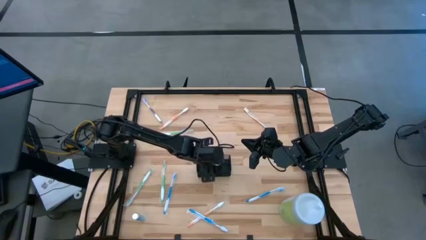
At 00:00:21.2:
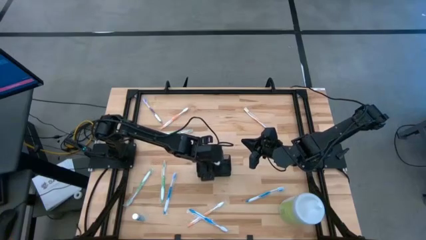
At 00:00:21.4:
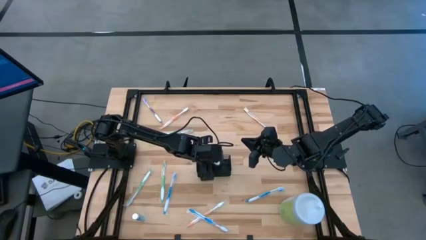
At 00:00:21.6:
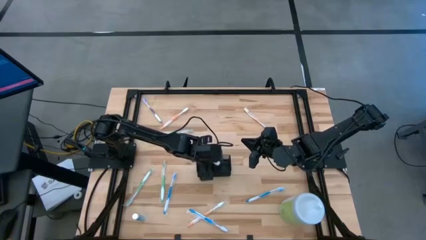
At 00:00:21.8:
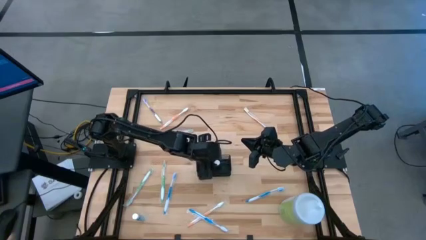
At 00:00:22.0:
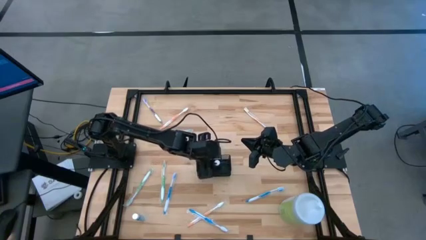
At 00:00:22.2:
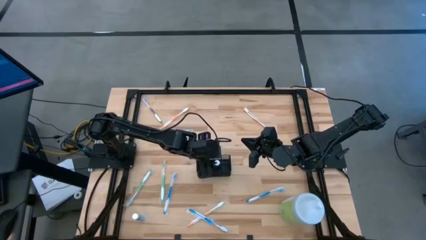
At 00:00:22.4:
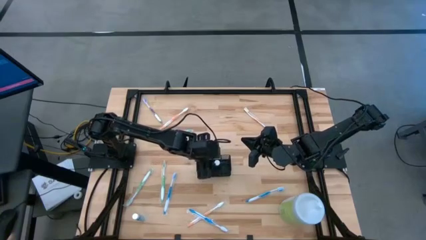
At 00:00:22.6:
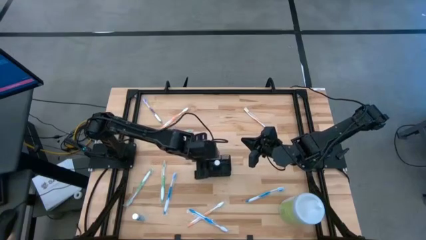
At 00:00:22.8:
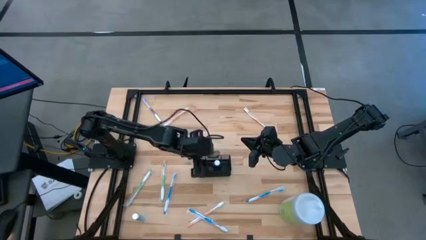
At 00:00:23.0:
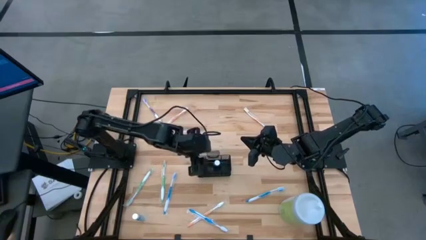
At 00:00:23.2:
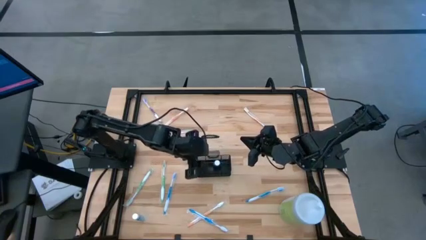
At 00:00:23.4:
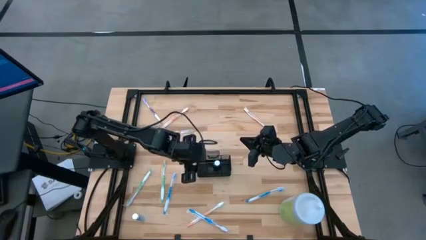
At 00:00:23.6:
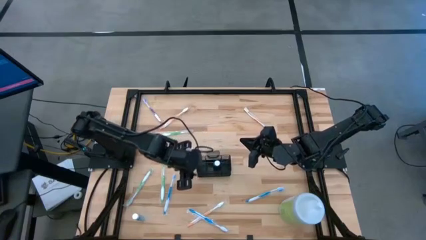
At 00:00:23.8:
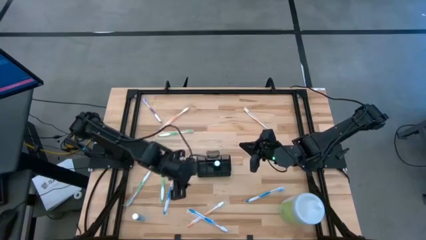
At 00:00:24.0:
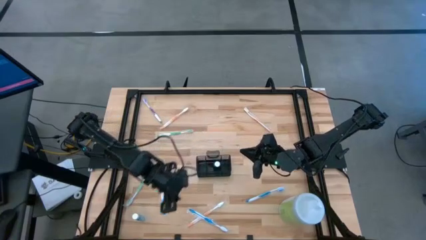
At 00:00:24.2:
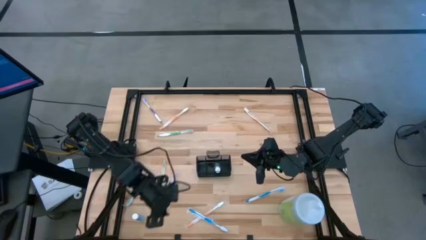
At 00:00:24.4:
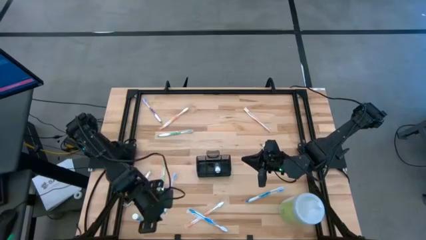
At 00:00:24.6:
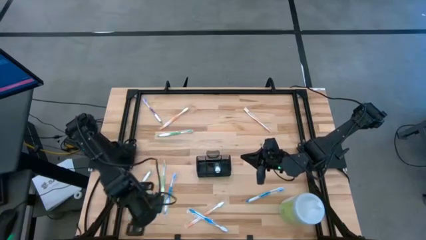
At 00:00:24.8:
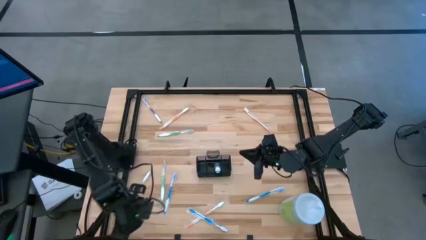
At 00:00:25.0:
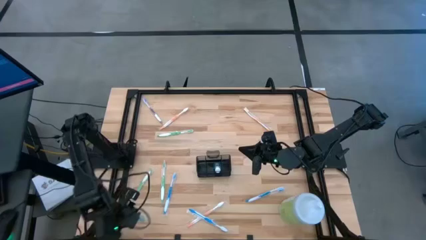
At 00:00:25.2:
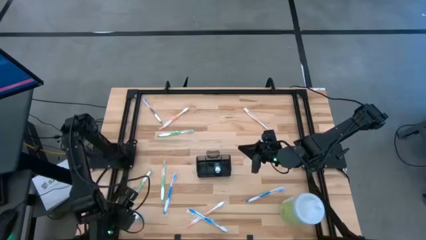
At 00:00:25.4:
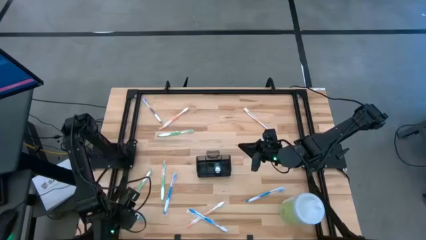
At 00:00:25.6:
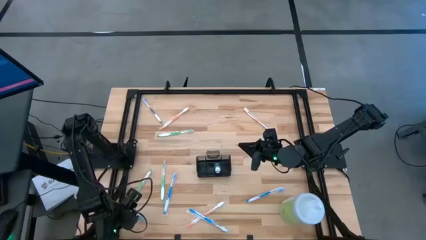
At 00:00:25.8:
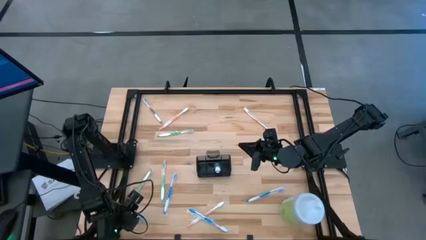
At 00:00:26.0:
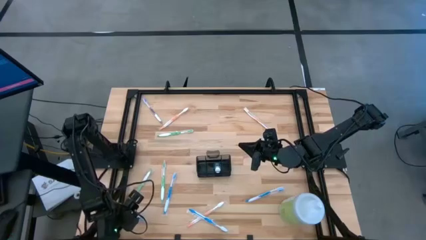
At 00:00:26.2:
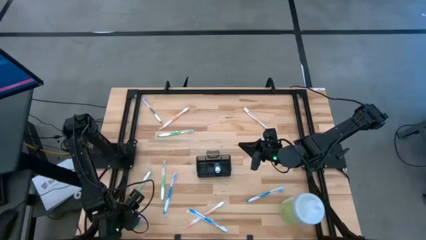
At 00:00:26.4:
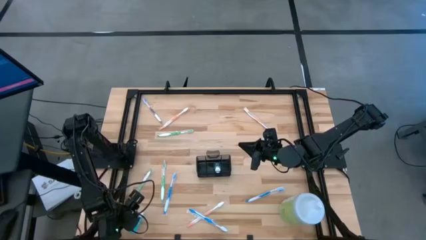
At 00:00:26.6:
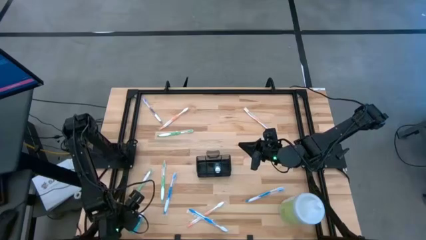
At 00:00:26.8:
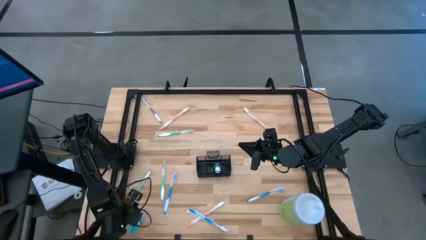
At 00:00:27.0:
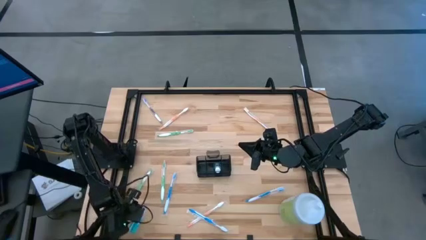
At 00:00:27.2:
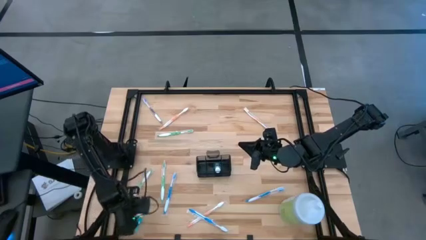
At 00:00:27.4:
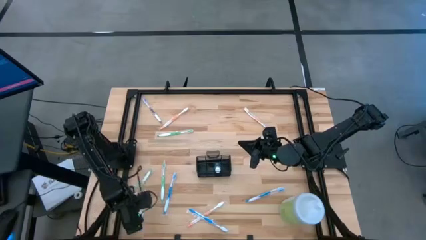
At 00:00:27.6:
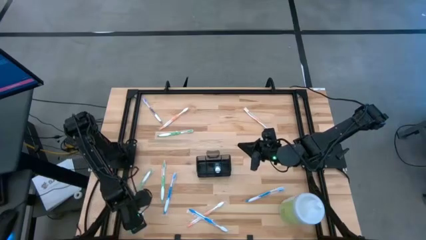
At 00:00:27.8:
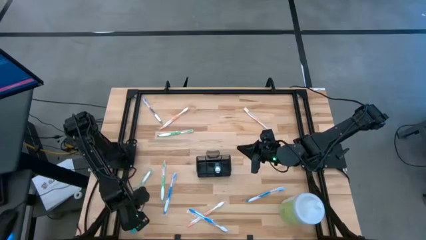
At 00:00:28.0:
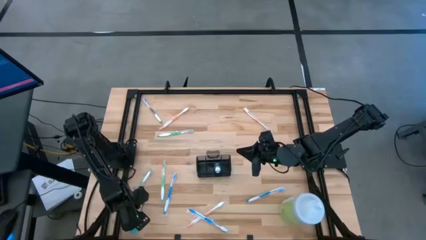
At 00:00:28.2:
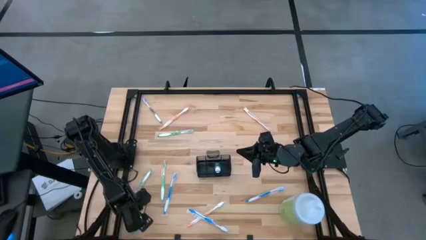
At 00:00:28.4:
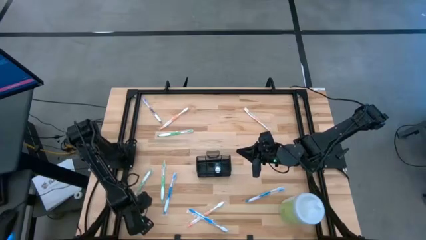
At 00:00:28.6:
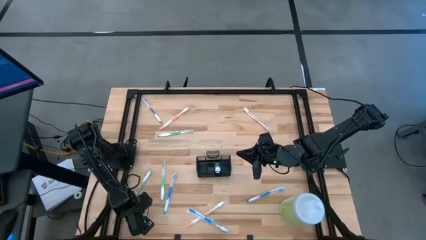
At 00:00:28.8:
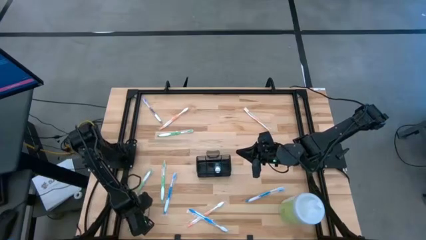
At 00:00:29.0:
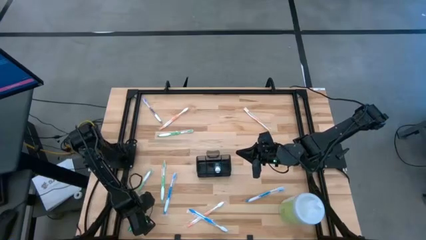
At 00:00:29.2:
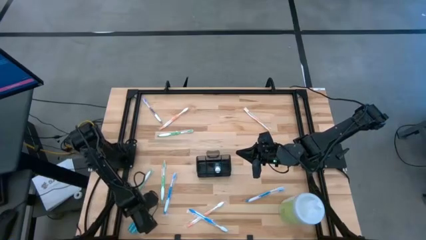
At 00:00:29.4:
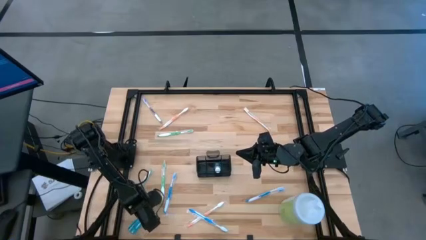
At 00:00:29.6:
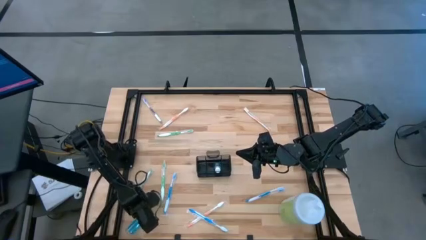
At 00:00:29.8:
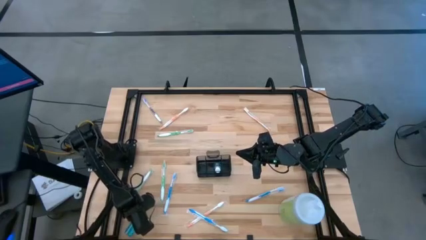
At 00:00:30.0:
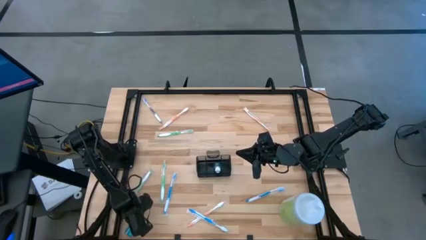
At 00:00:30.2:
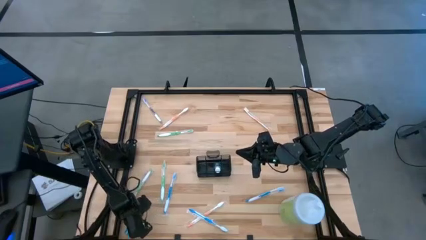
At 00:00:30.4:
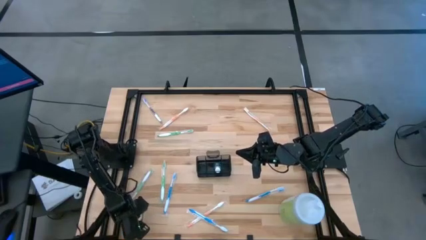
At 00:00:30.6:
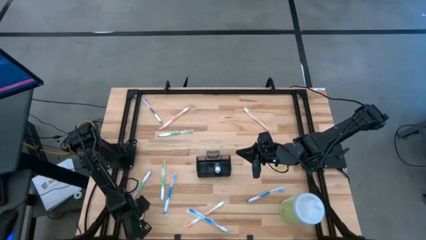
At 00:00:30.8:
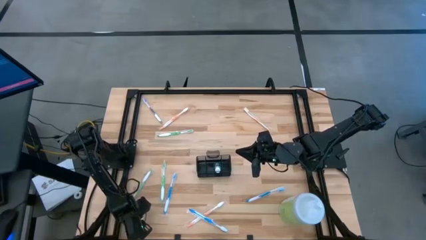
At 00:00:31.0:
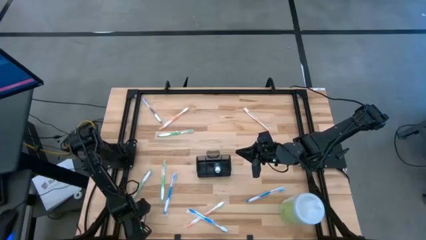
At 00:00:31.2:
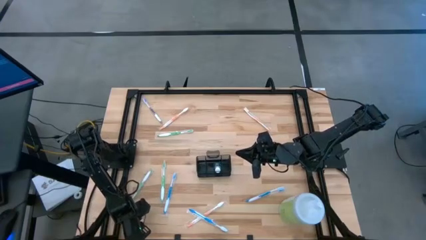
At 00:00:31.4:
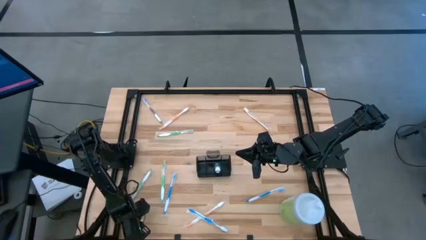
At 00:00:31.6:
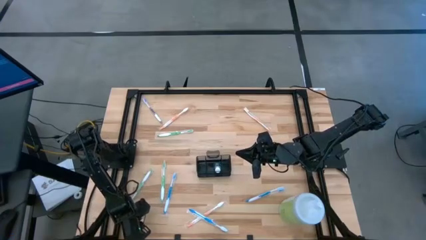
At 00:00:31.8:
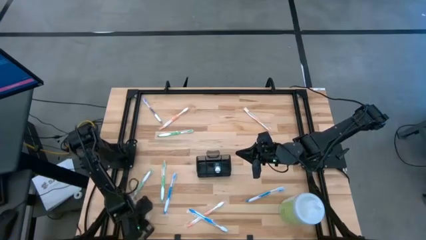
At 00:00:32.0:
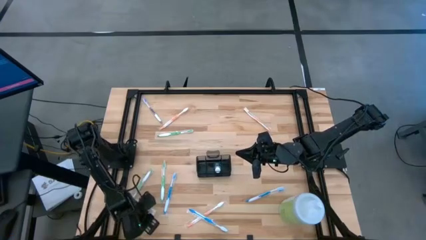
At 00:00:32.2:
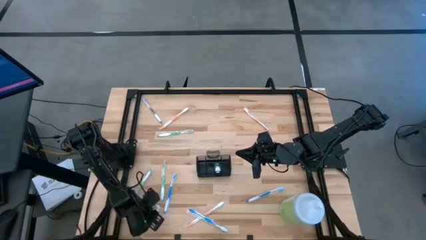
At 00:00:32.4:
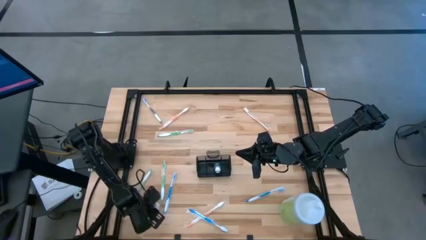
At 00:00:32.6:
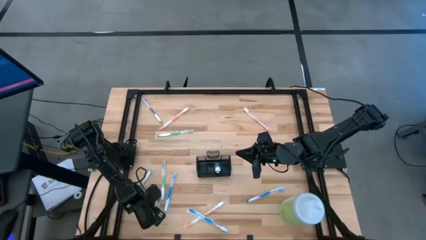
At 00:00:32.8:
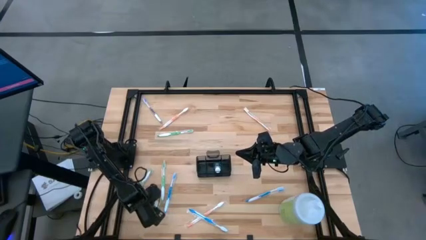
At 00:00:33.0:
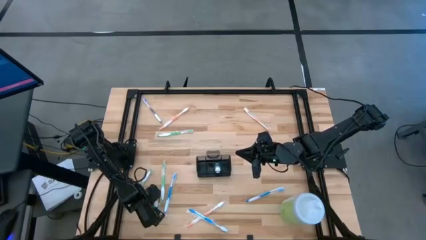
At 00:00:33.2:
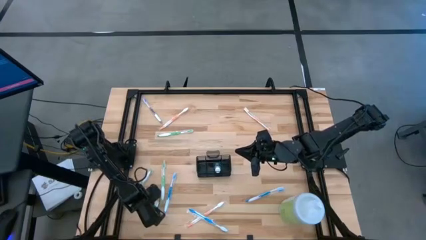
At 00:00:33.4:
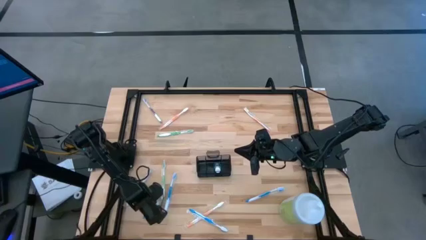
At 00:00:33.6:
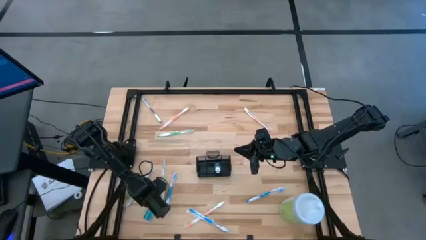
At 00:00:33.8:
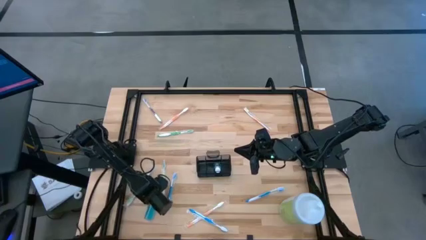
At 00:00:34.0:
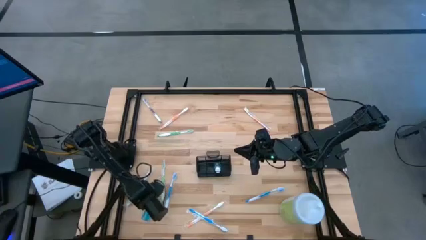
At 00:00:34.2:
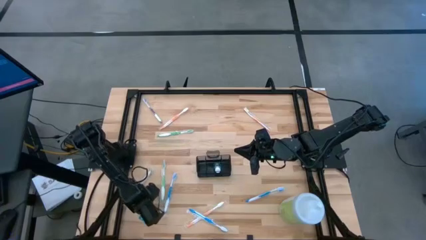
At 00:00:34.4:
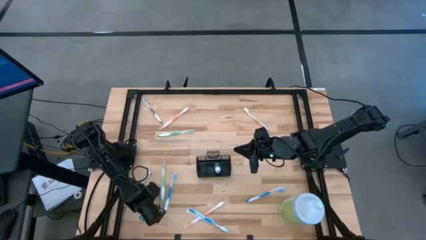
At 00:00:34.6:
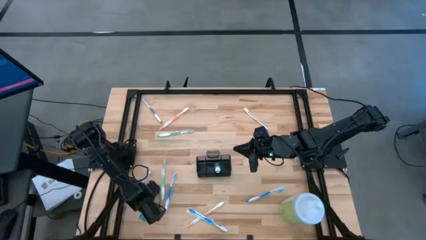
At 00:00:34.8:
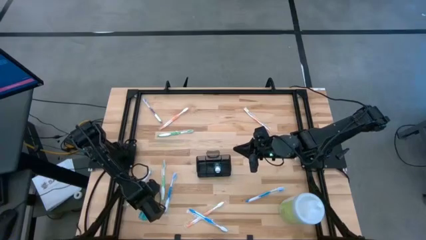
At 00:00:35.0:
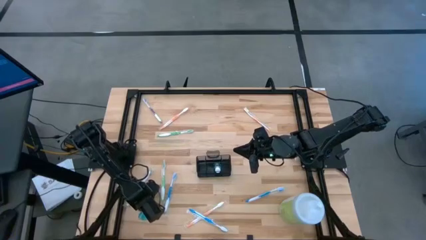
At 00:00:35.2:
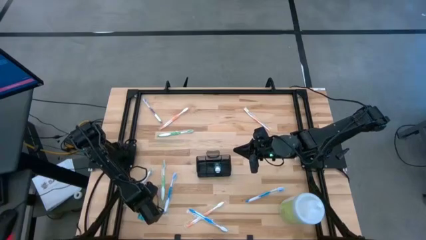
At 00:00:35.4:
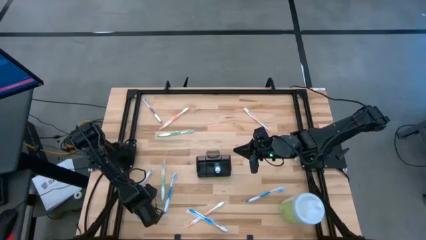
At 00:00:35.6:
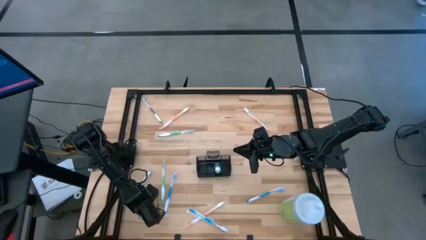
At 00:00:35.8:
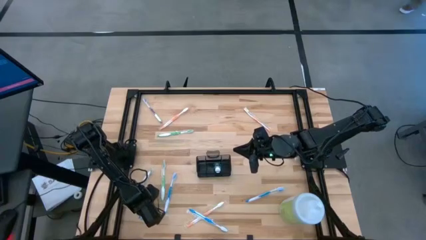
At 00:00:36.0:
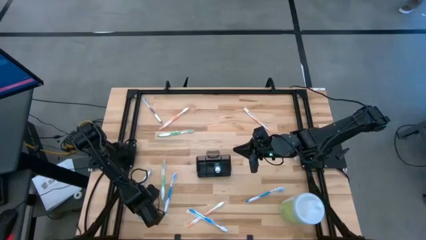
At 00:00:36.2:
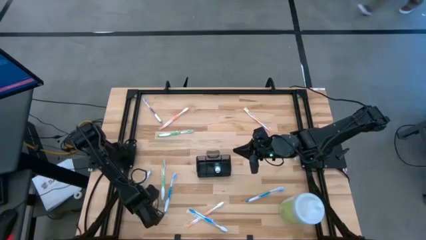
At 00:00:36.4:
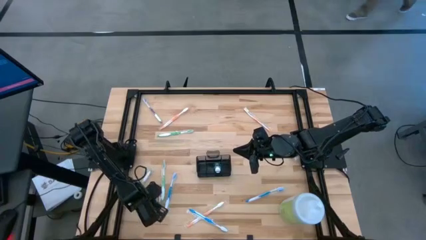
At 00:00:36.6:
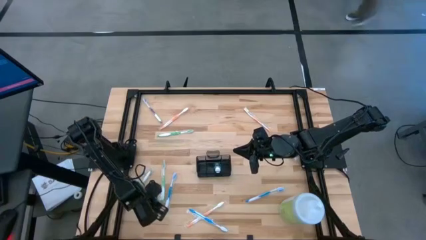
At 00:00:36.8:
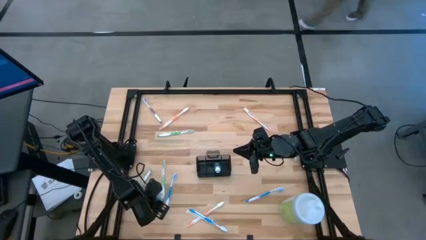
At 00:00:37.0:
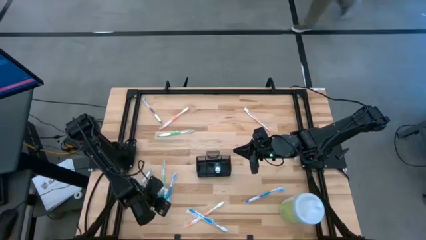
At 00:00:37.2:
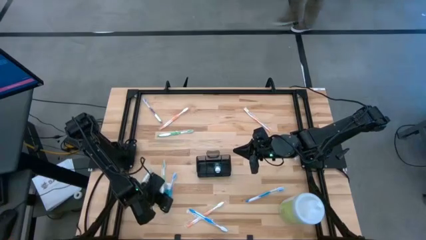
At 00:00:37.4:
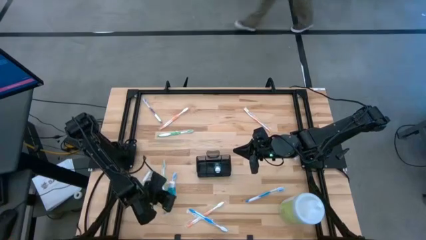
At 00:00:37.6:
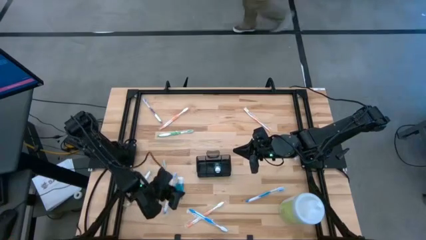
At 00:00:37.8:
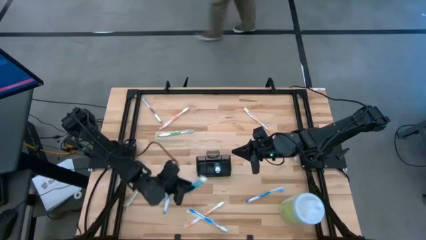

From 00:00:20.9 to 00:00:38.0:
Task: Pick & Place toothbrushing station
Put the mouthwash into the middle section of the mesh organizer
